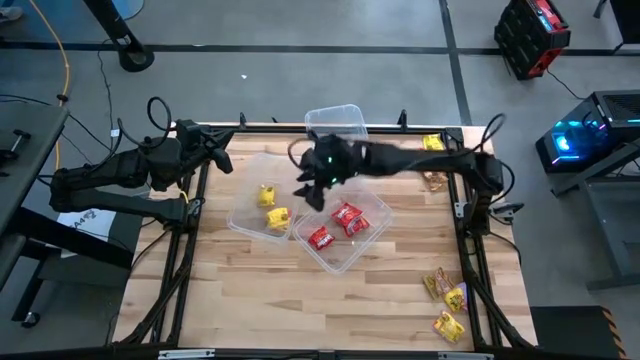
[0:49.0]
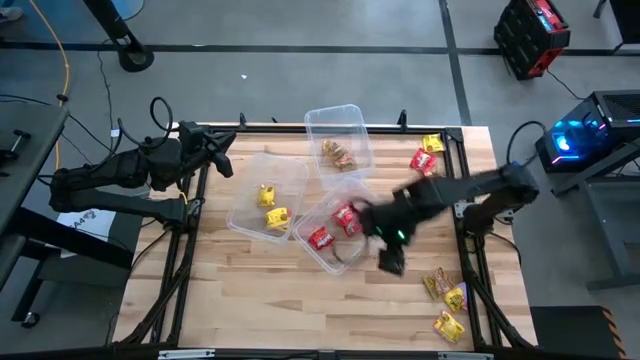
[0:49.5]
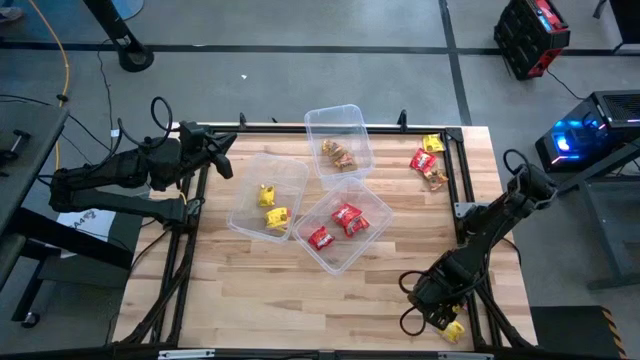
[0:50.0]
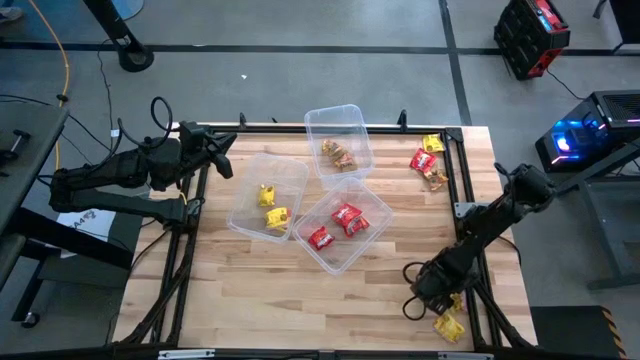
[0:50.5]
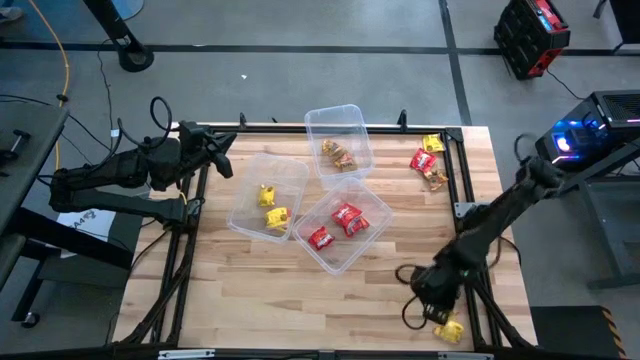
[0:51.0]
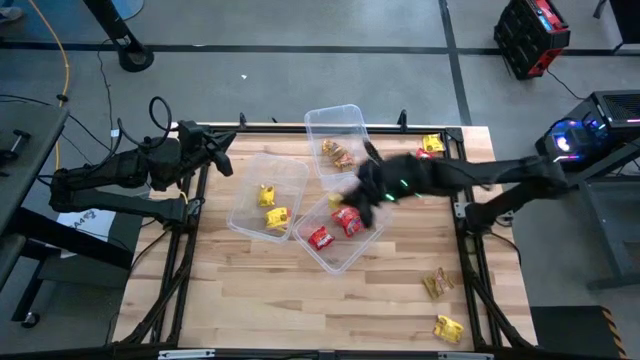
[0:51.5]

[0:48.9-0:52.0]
Task: Sort candy
Put the yellow candy into the bottom left transparent bin

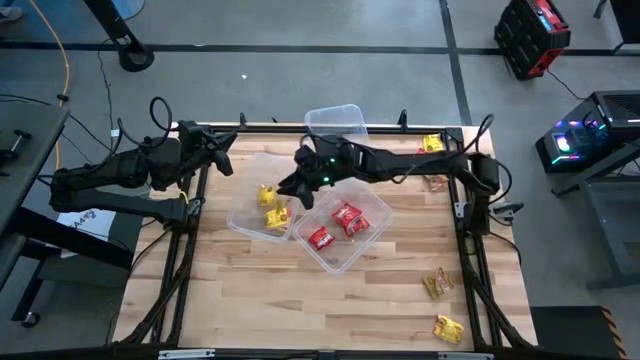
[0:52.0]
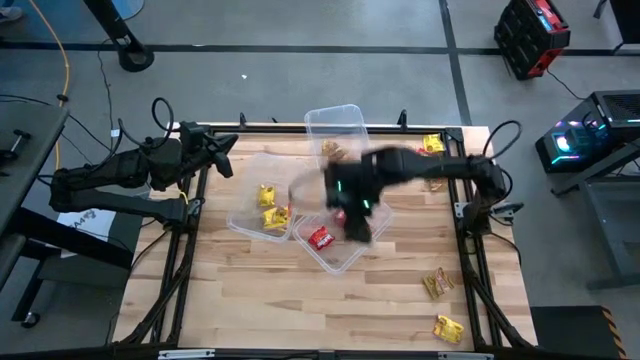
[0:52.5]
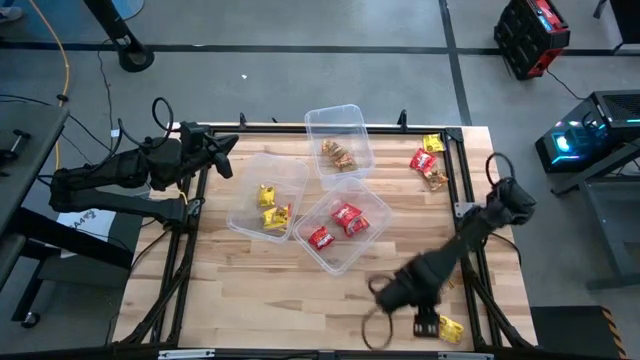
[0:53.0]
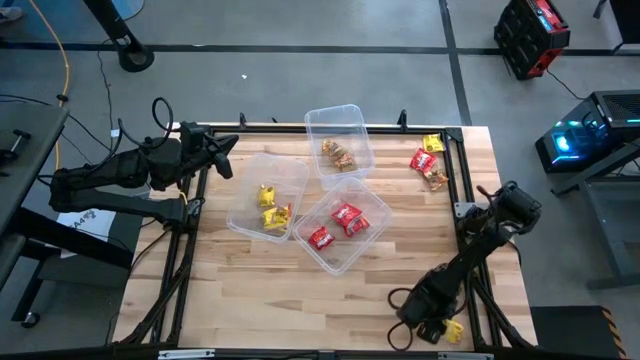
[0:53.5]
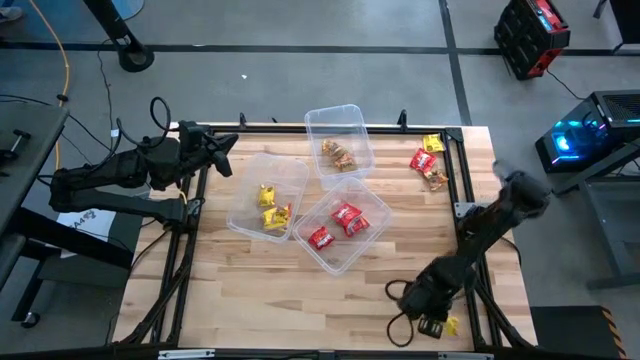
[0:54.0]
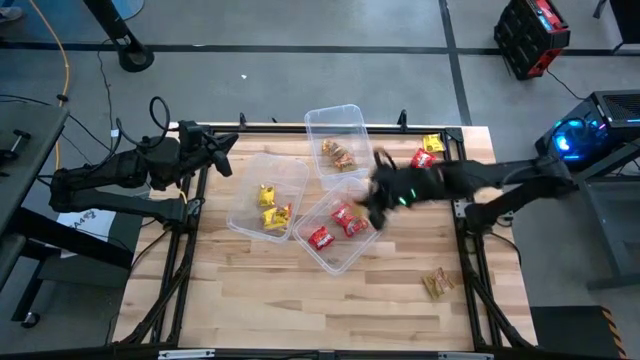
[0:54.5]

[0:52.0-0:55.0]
Put the yellow candy into the bottom left transparent bin

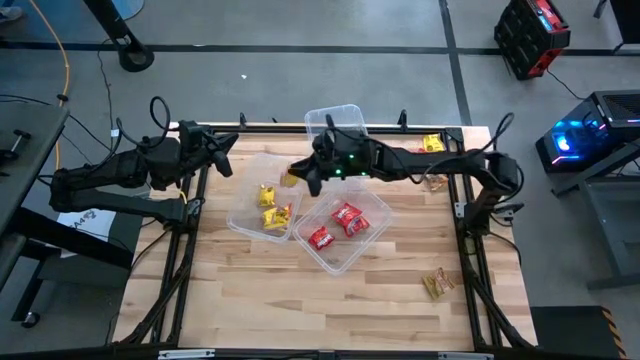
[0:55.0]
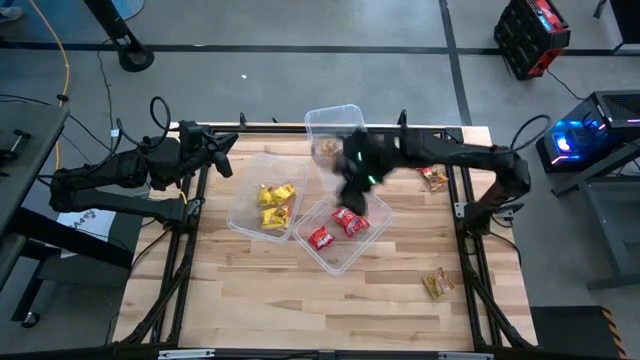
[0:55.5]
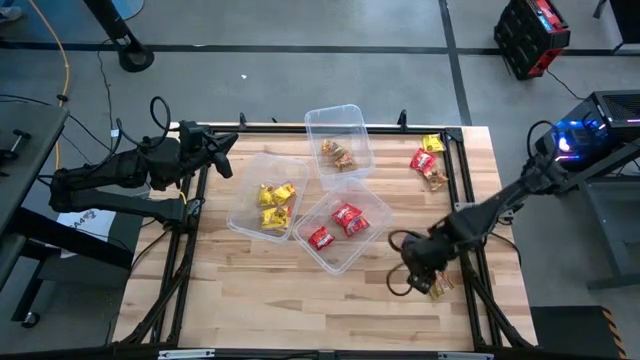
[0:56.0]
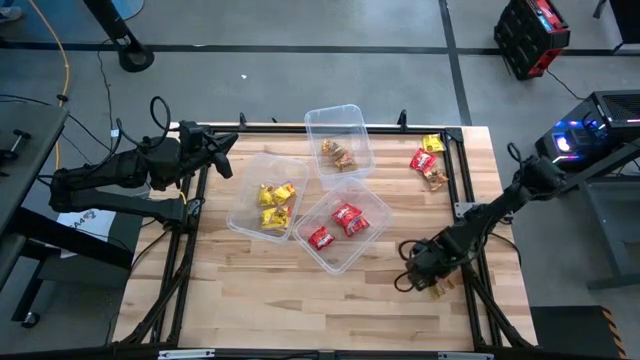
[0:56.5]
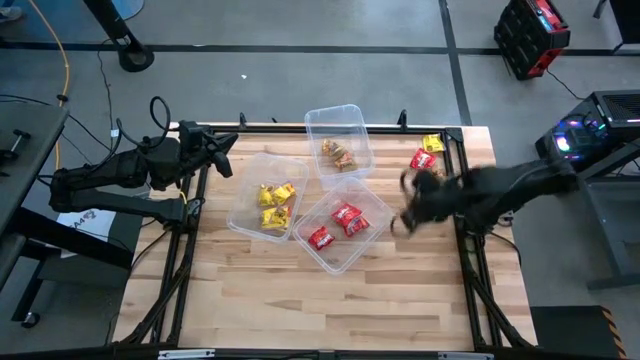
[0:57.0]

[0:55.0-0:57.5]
Put the brown candy into the top right transparent bin

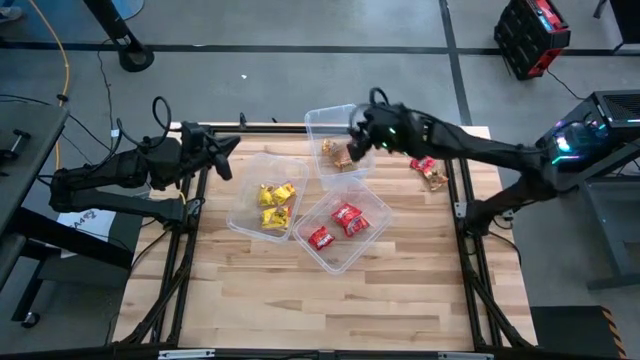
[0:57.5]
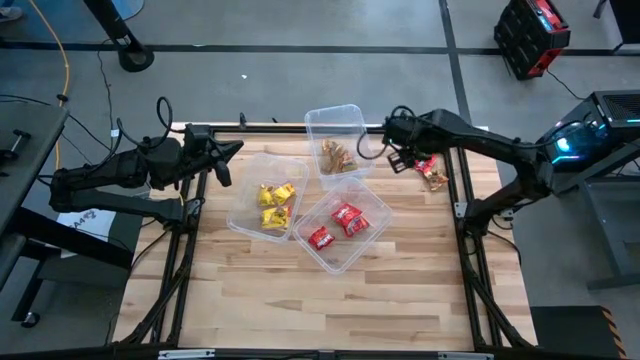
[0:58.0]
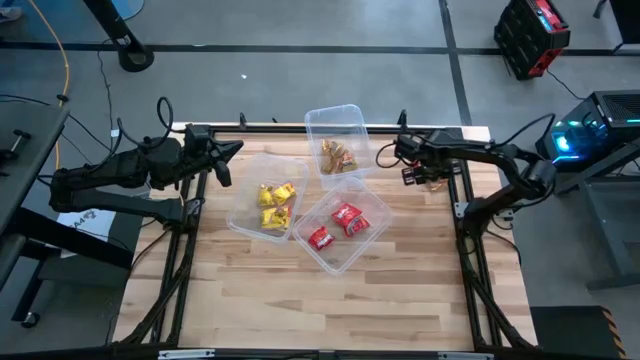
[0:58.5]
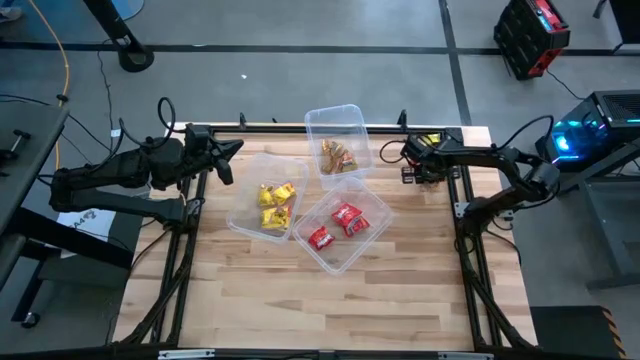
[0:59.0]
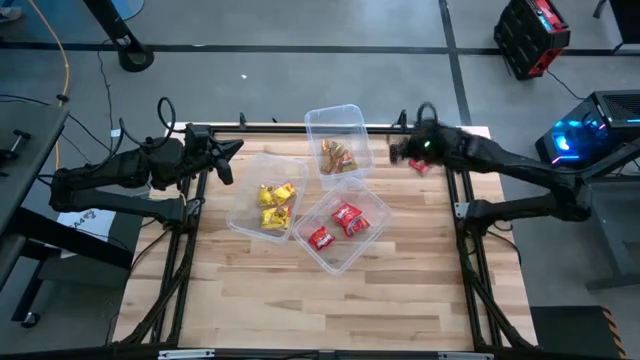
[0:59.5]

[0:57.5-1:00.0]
Put the brown candy into the top right transparent bin

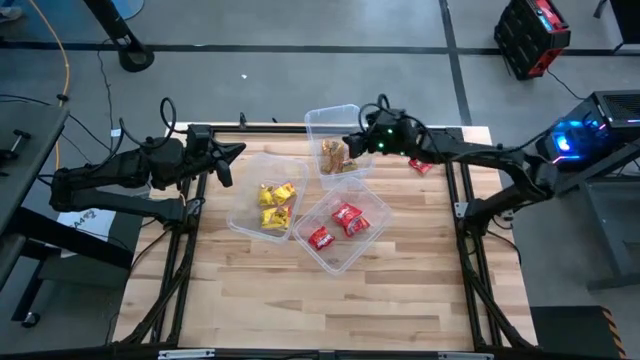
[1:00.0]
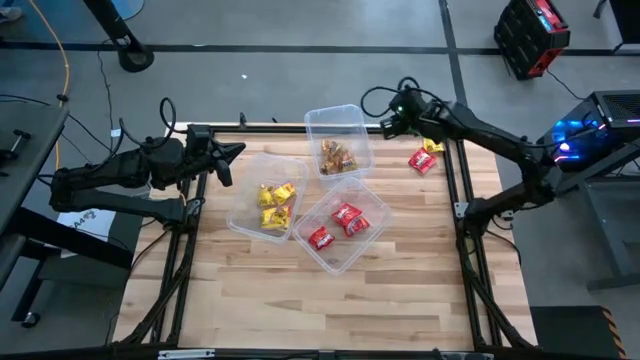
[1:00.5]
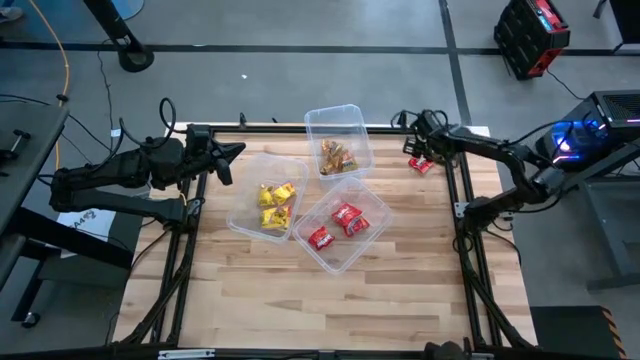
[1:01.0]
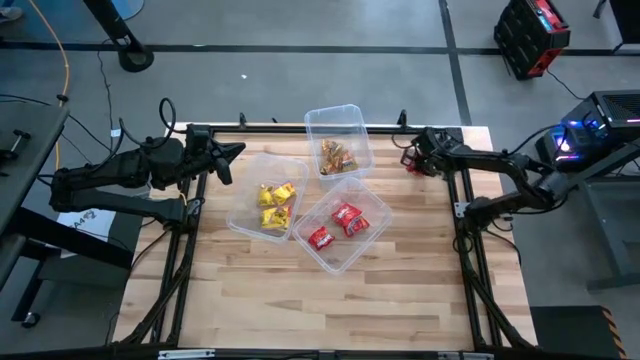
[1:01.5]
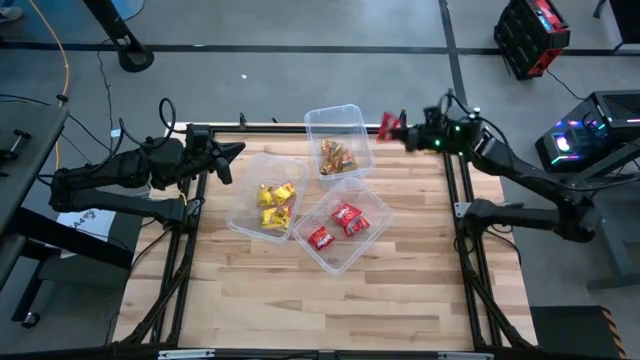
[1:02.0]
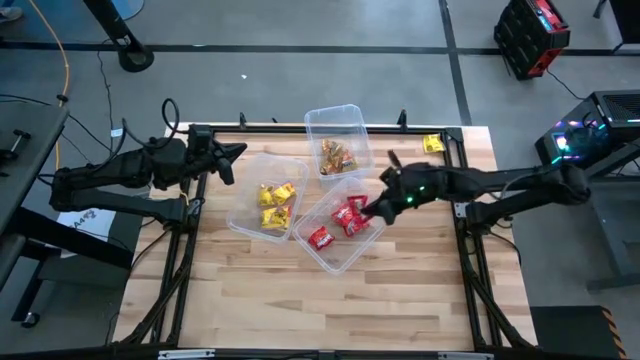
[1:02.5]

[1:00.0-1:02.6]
Put the red candy into the bottom right transparent bin

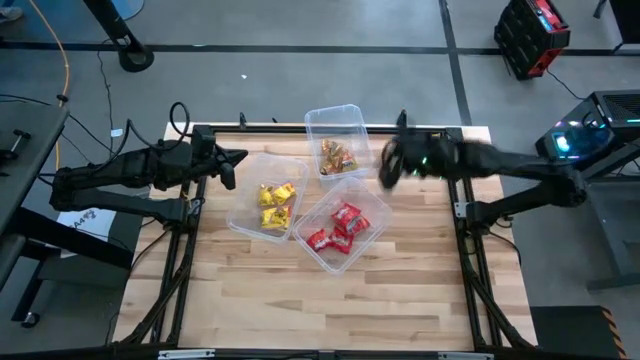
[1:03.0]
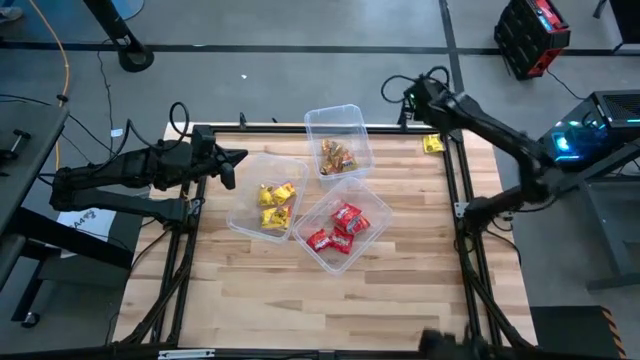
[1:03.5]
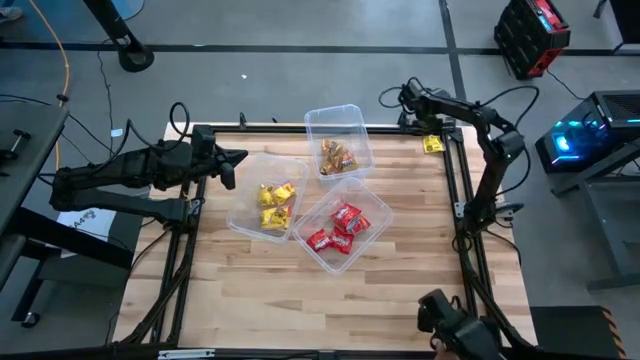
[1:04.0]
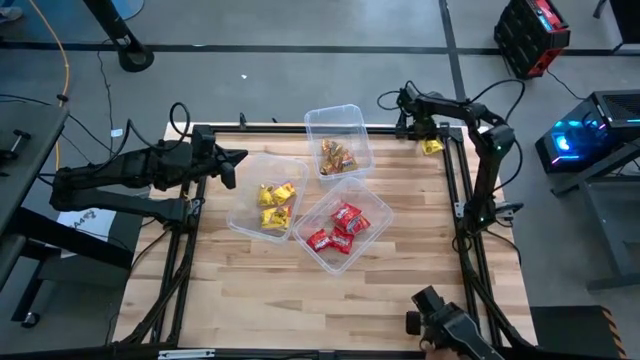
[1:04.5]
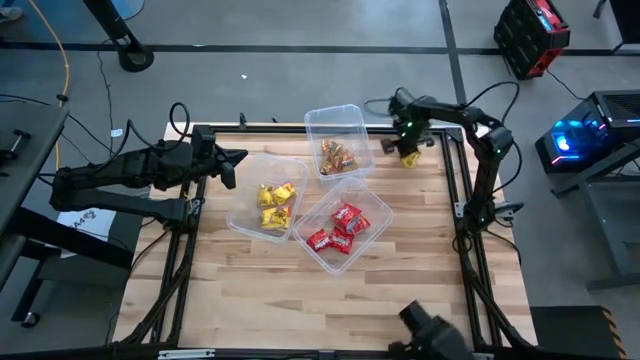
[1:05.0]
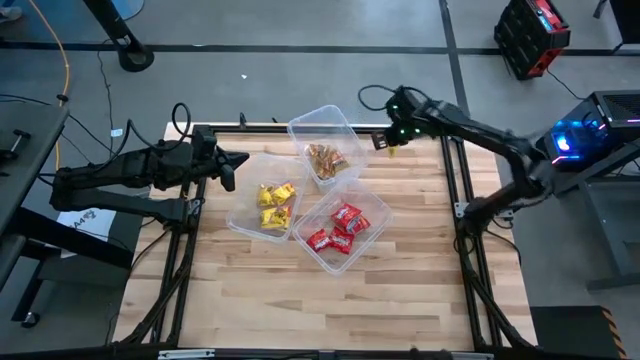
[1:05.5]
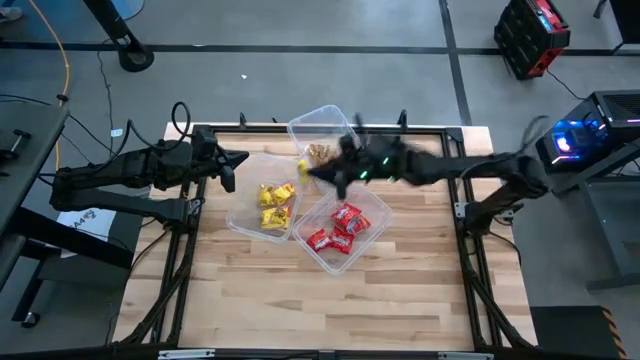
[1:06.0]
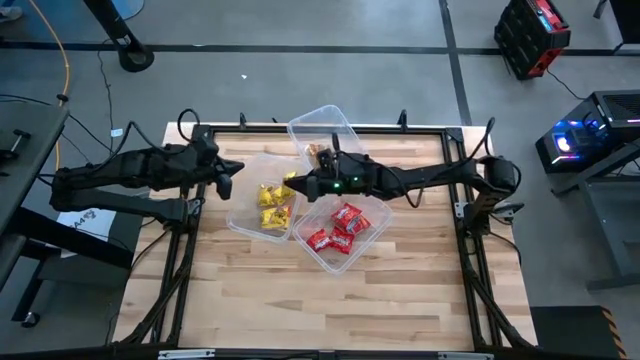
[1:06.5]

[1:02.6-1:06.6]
Put the yellow candy into the bottom left transparent bin

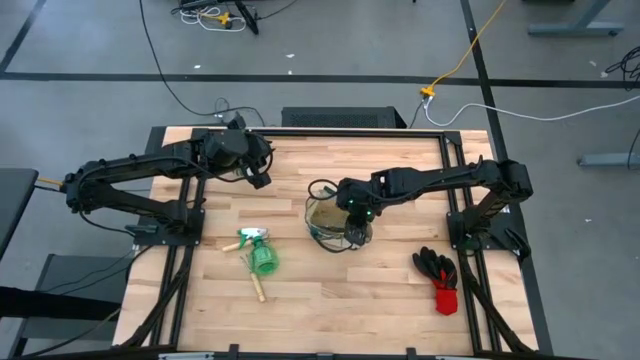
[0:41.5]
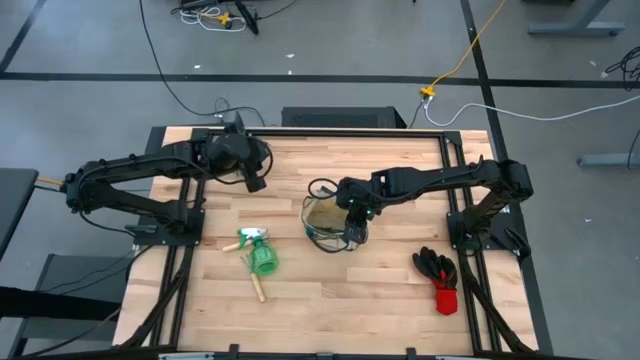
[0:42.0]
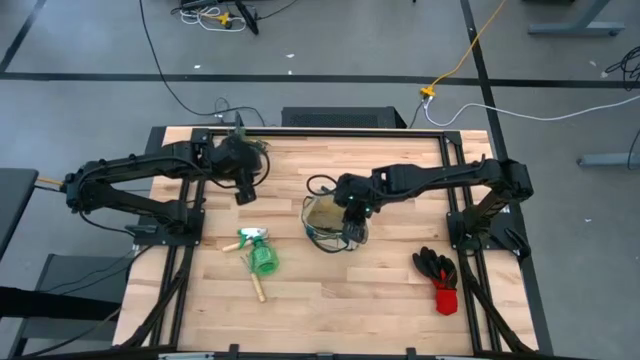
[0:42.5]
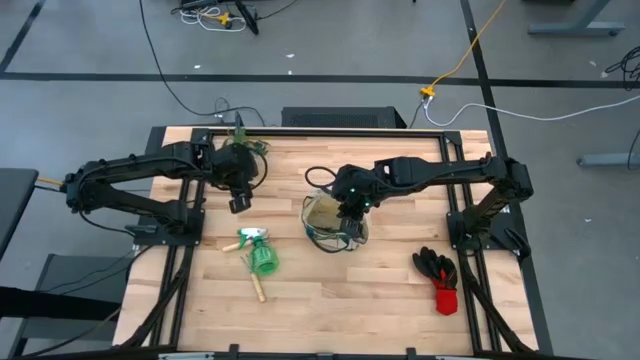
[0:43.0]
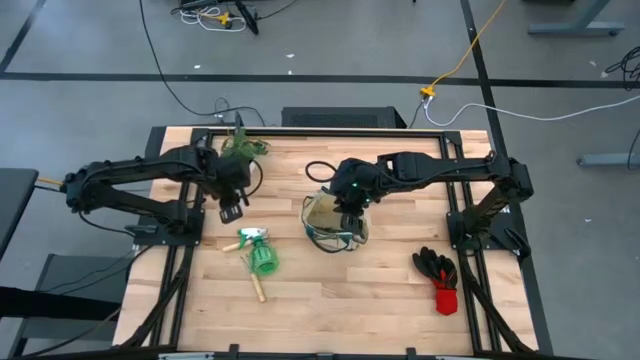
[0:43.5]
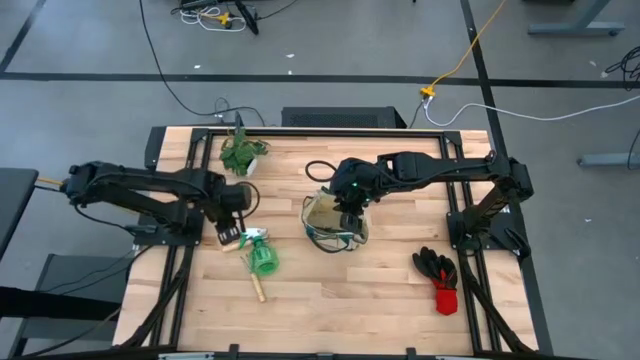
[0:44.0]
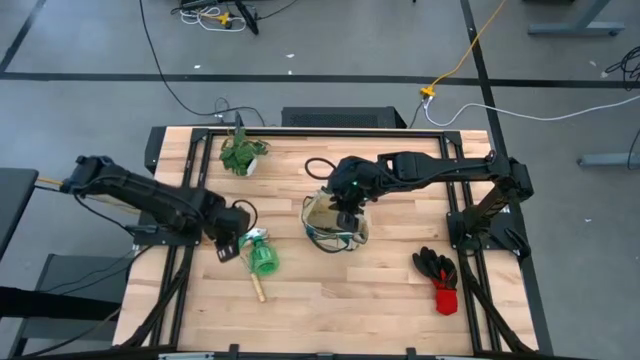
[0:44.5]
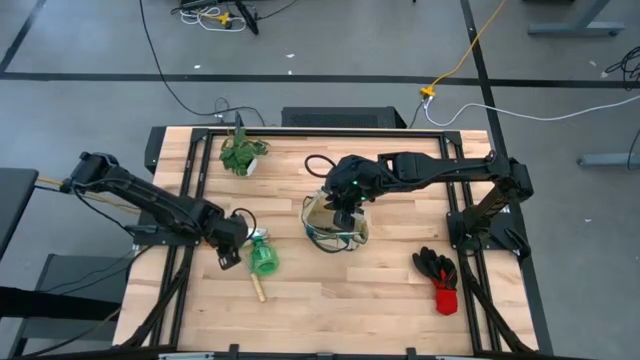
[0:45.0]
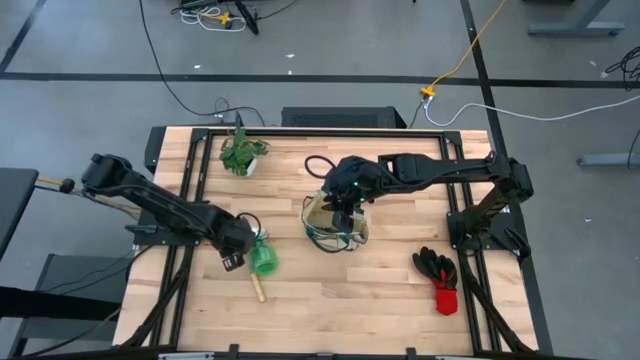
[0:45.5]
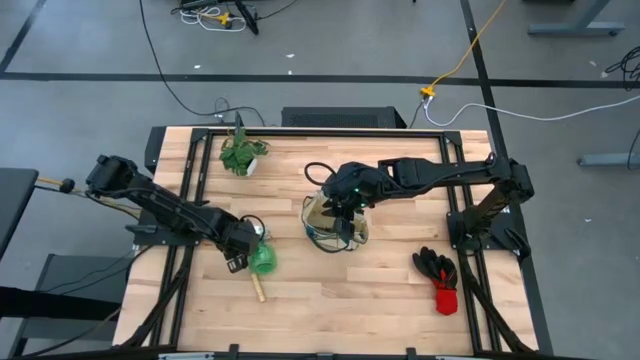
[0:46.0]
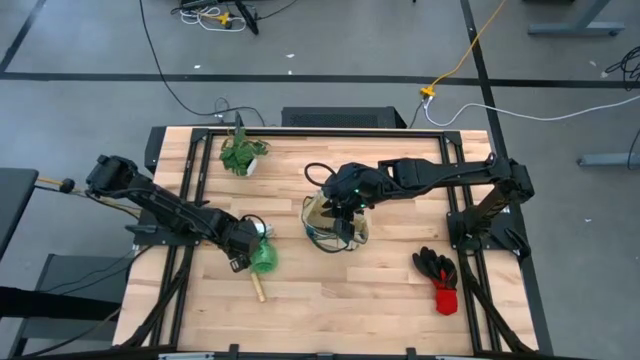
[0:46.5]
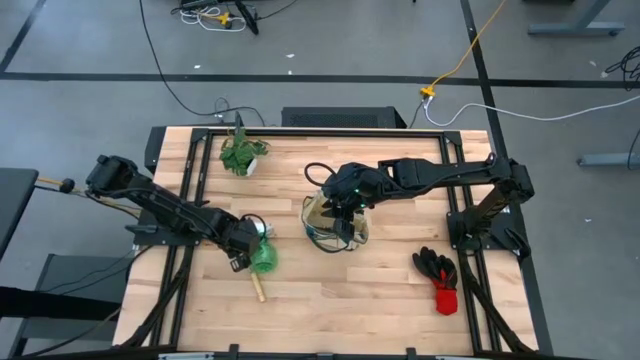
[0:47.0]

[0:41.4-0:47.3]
Task: Pick & Place Garden tools in Gardening bag
Put the top brown hand rake into the white gardening bag
